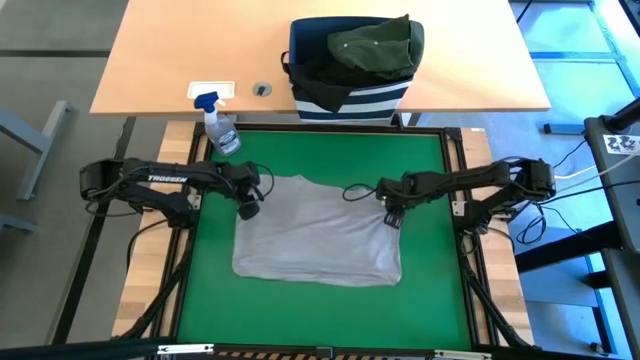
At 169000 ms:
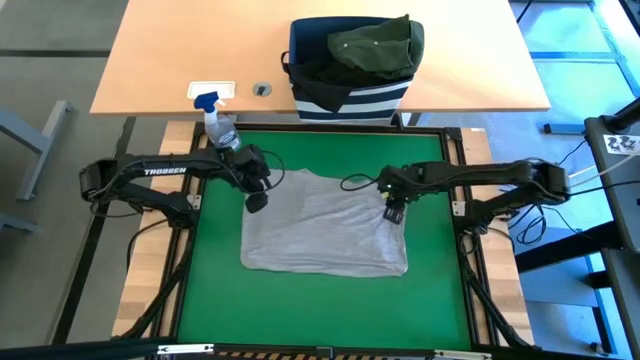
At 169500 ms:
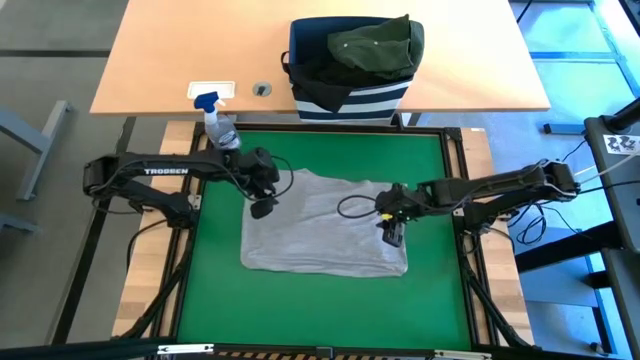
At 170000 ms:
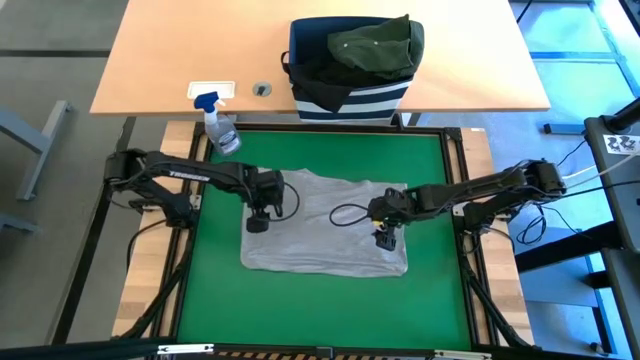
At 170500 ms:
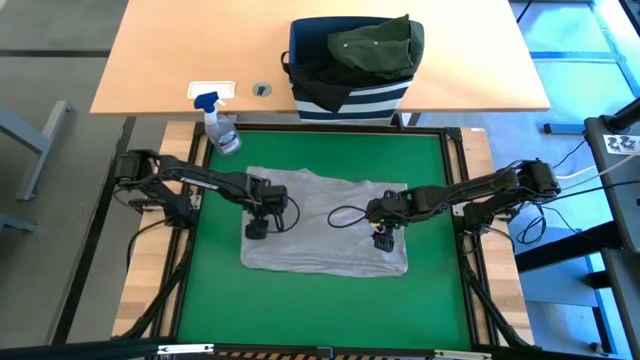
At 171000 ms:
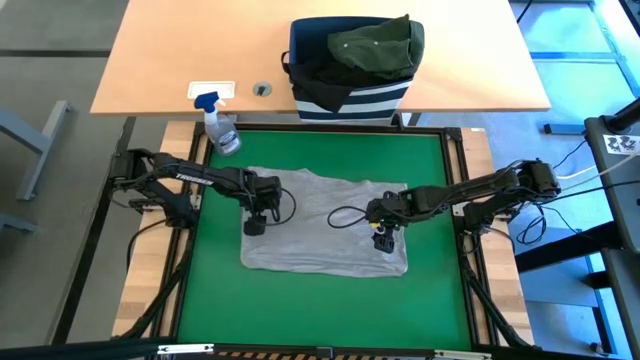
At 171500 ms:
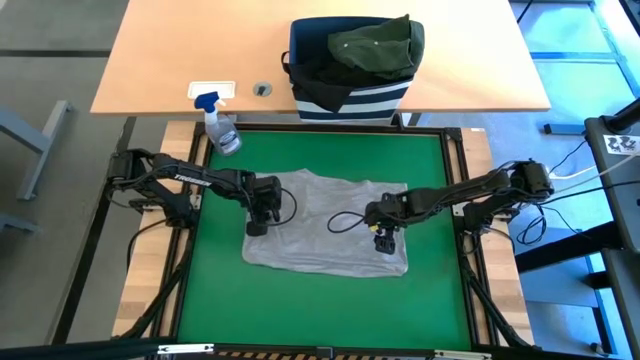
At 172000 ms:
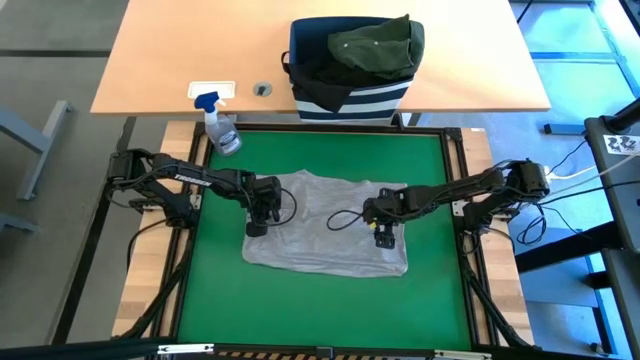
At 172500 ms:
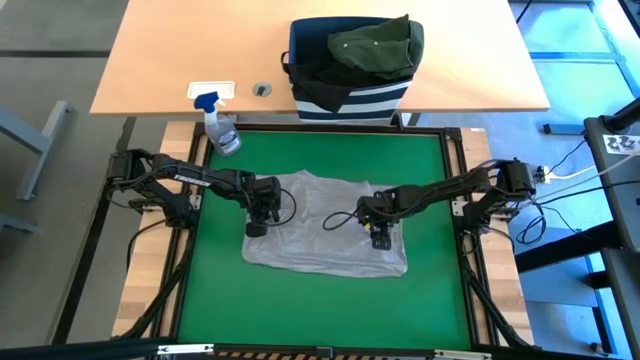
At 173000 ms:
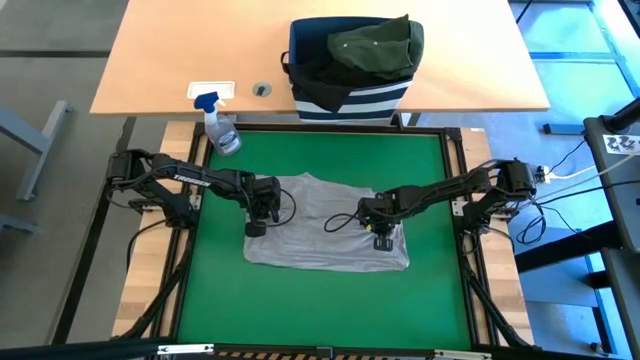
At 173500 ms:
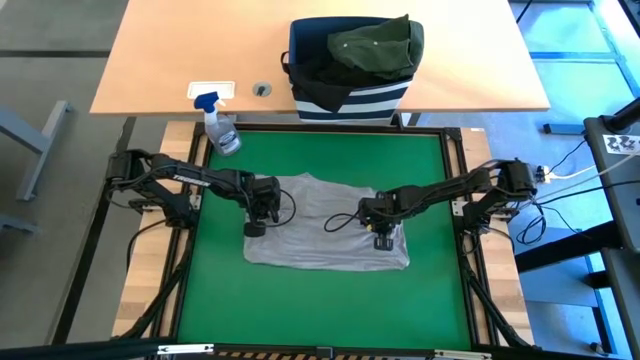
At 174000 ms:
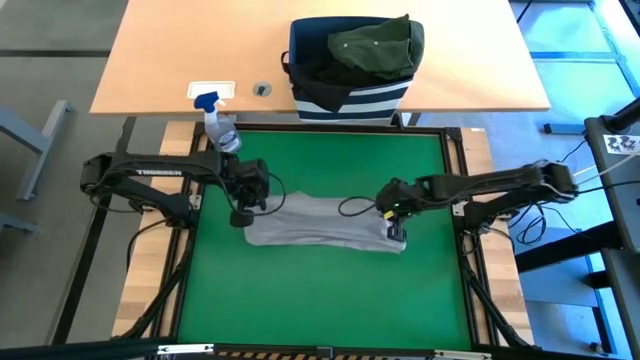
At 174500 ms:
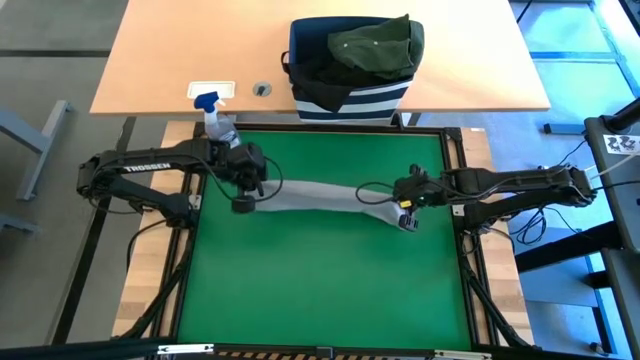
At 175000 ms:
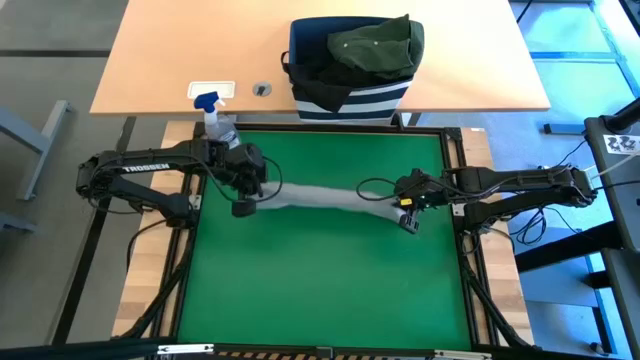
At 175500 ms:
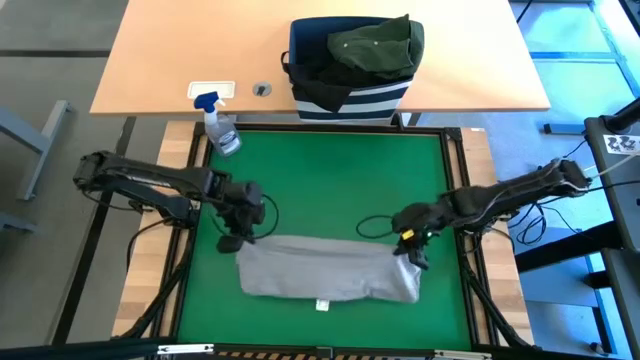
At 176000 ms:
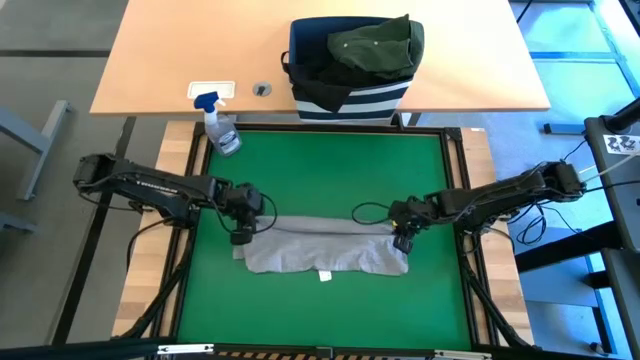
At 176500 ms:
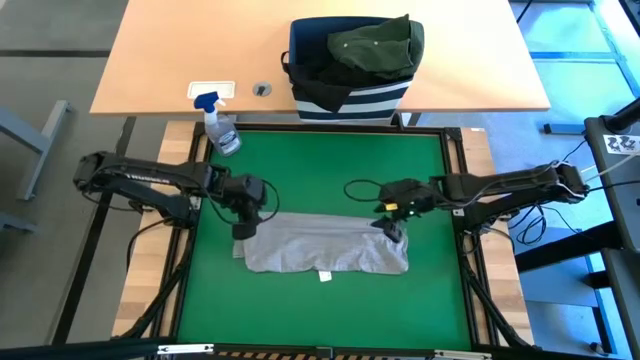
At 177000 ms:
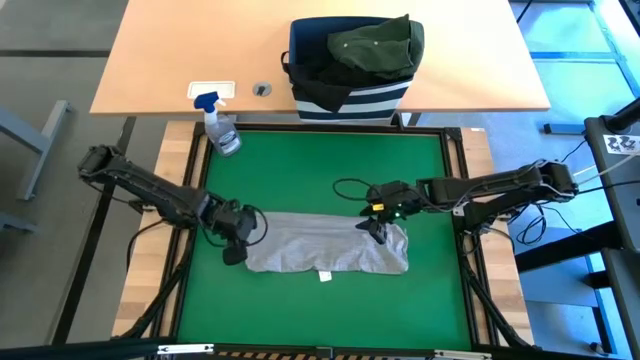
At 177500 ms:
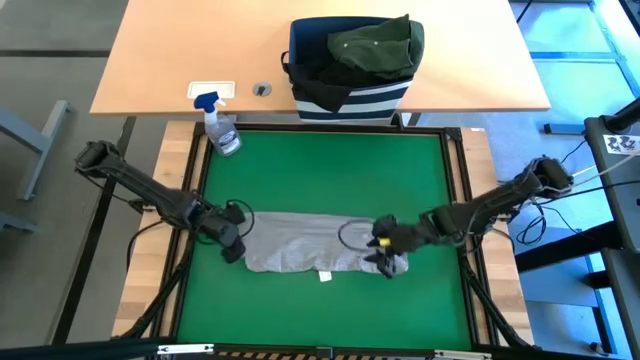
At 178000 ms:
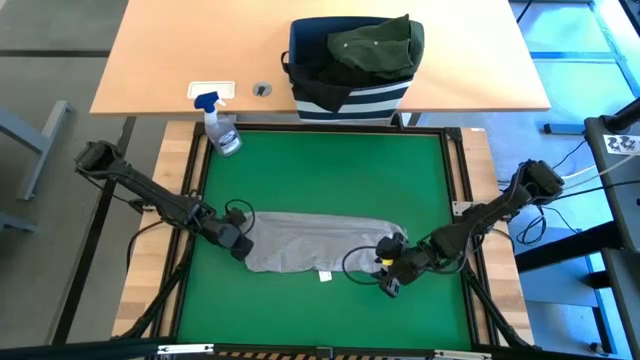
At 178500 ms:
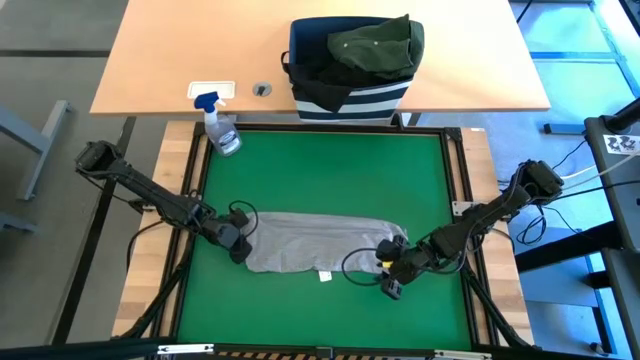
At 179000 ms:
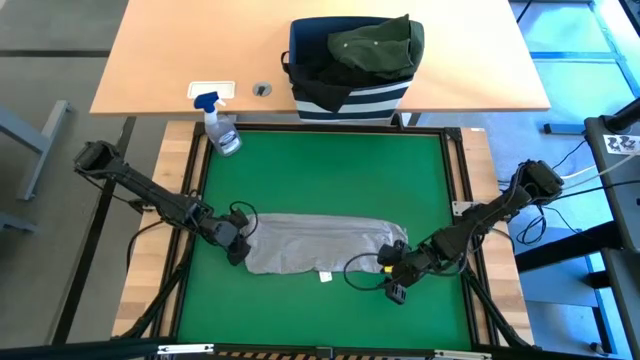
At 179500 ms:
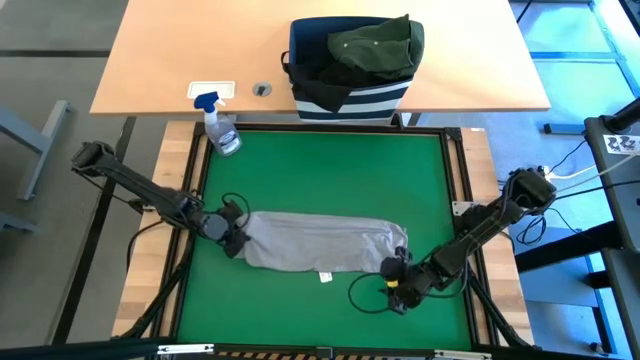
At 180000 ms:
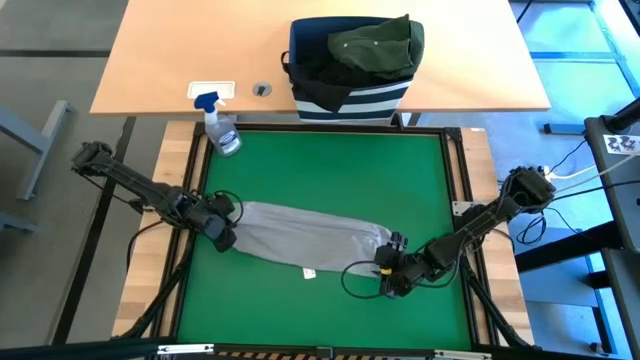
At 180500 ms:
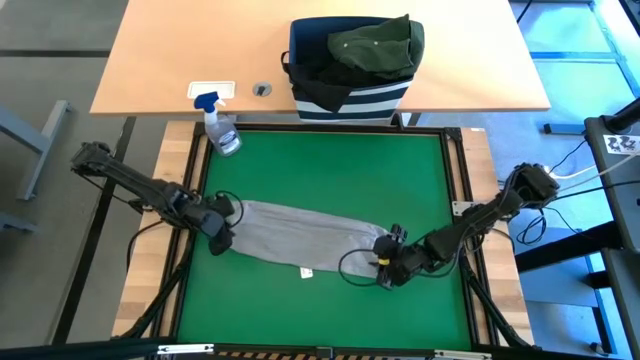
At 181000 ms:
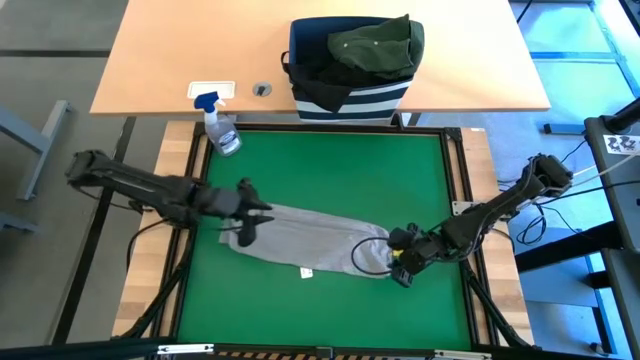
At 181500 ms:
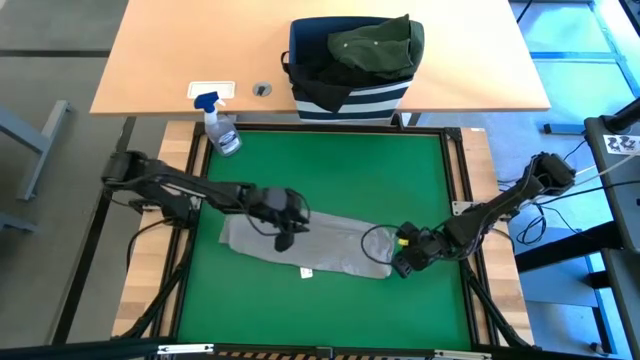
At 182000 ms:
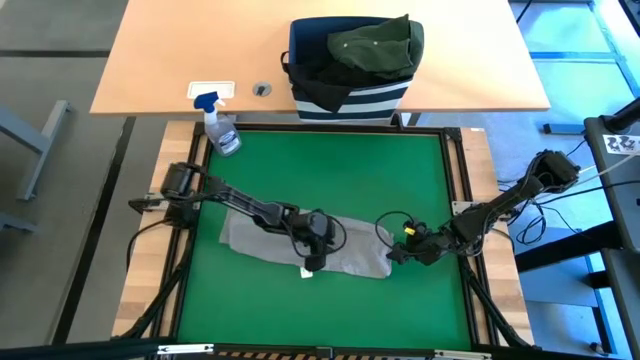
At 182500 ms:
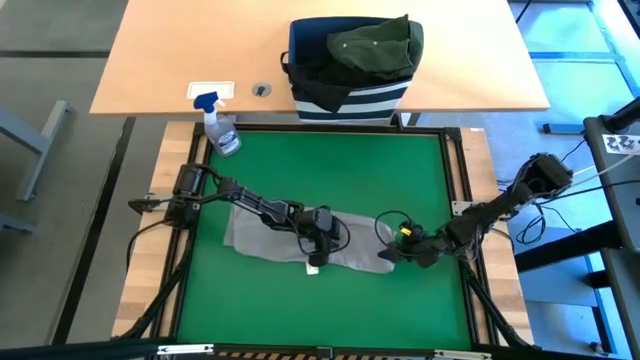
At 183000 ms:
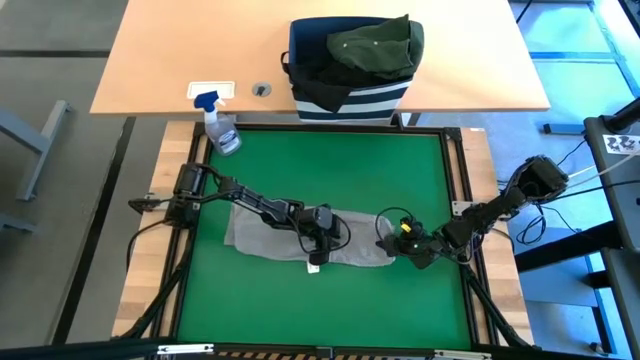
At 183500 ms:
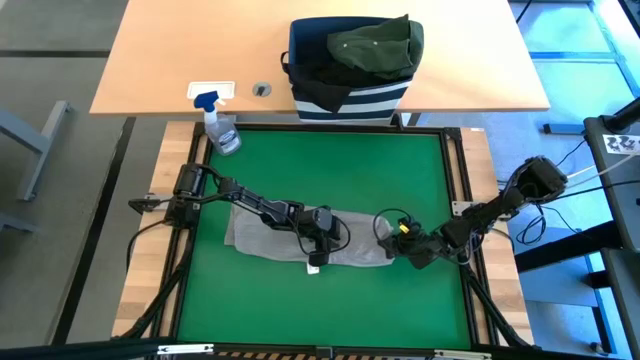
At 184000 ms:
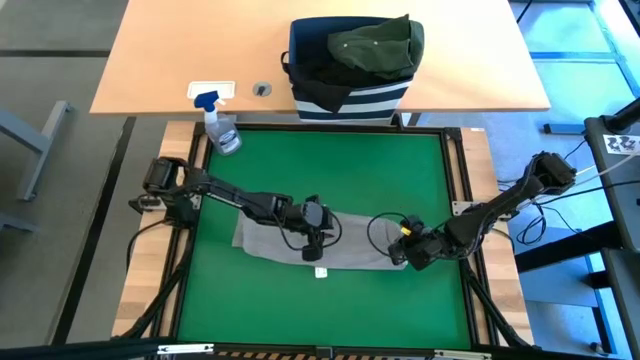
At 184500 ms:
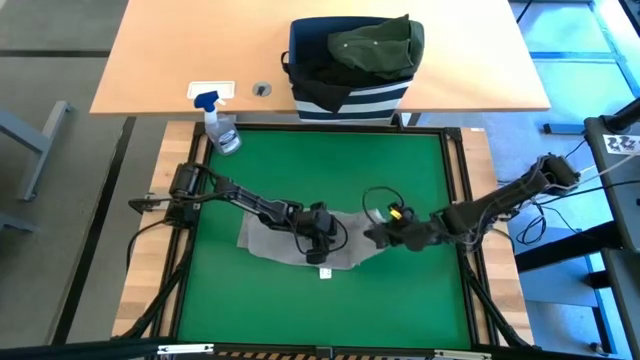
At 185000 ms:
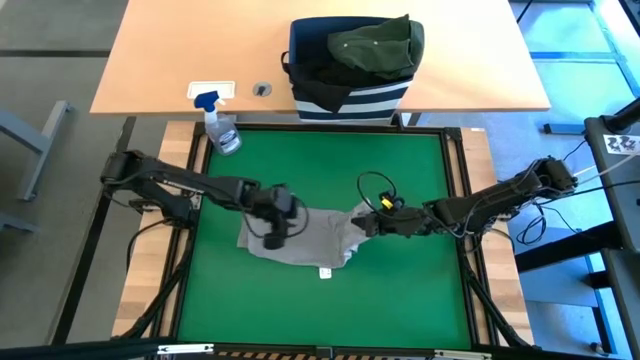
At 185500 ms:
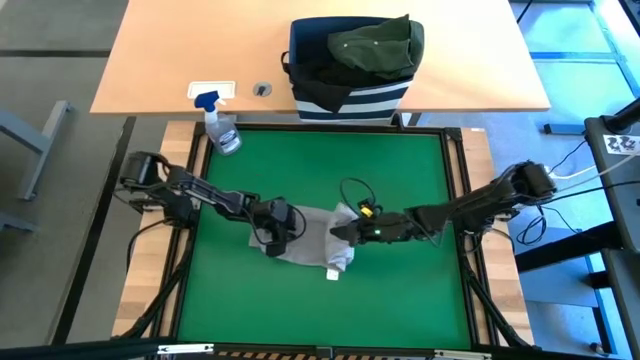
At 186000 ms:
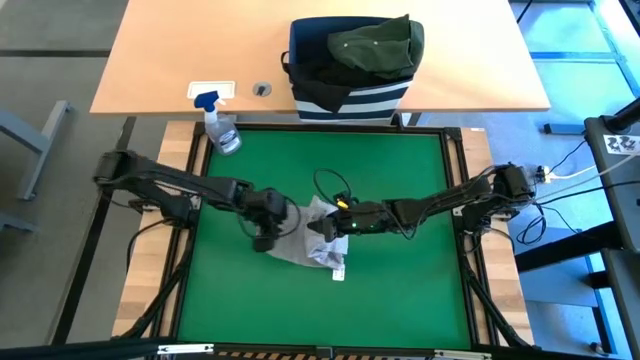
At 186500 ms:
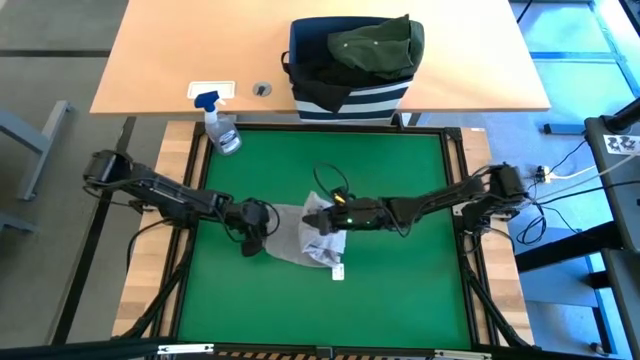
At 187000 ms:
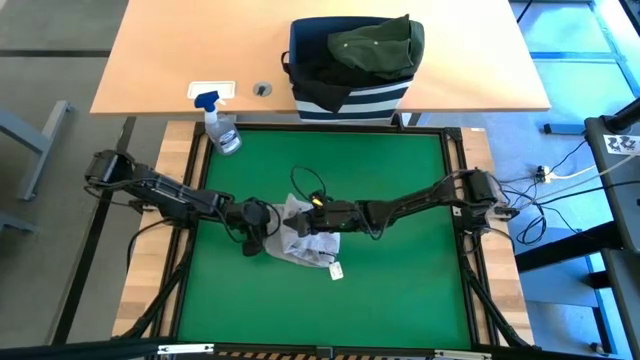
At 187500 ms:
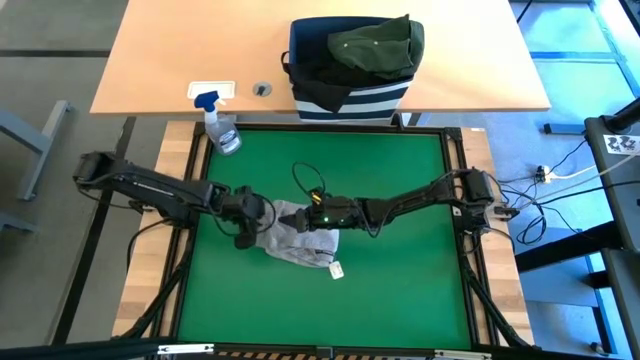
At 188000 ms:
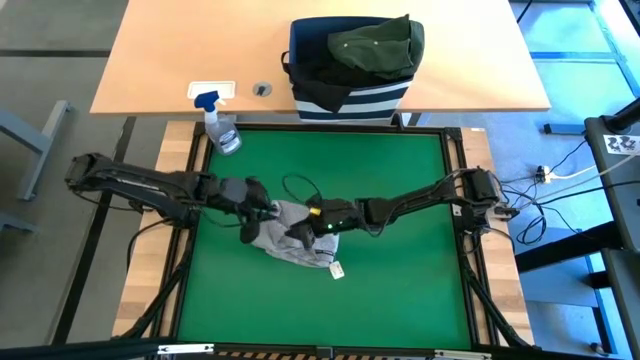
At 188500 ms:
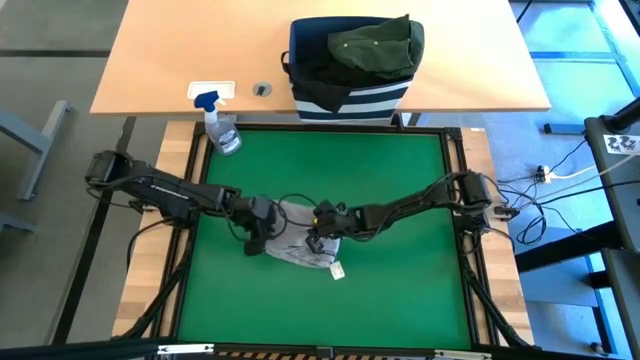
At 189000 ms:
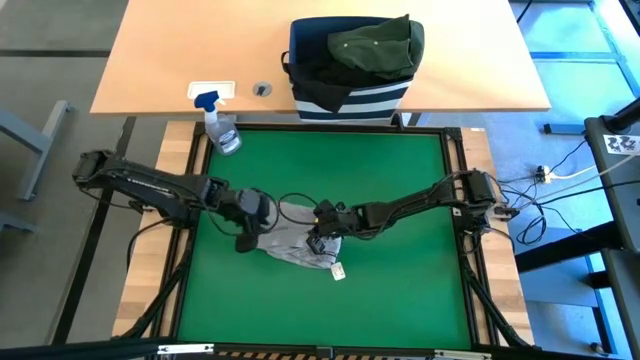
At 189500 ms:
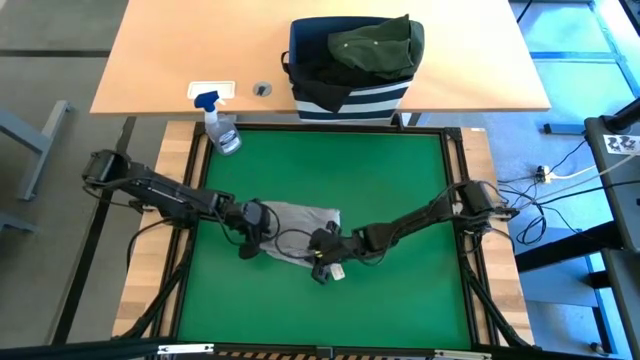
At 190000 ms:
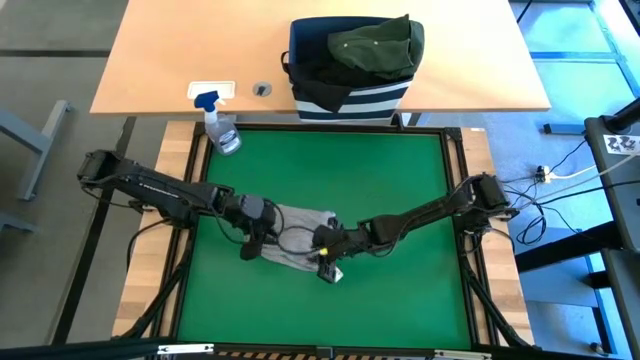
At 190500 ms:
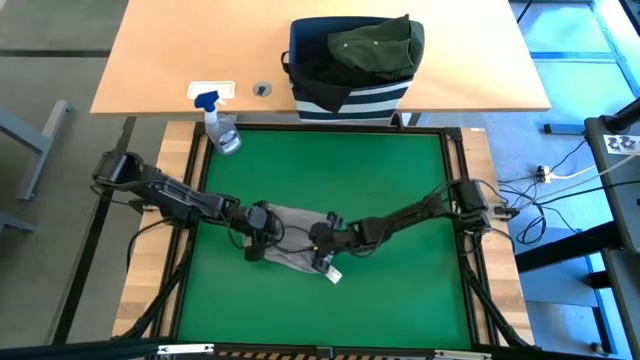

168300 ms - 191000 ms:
Task: Fold Laundry from Bin
Fold the gray shirt

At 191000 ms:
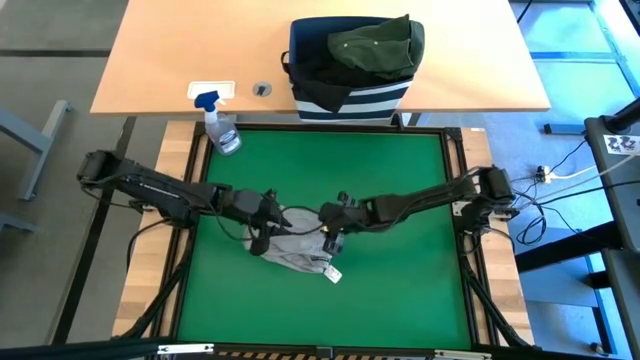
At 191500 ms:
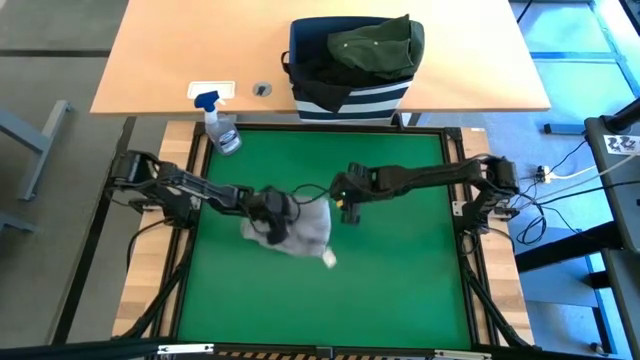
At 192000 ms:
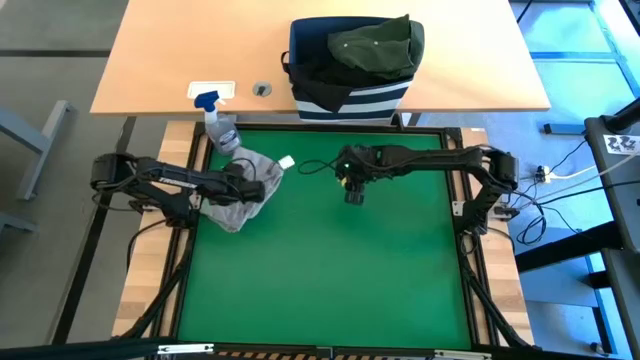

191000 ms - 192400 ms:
Move the gray shirt to the top left of the table
